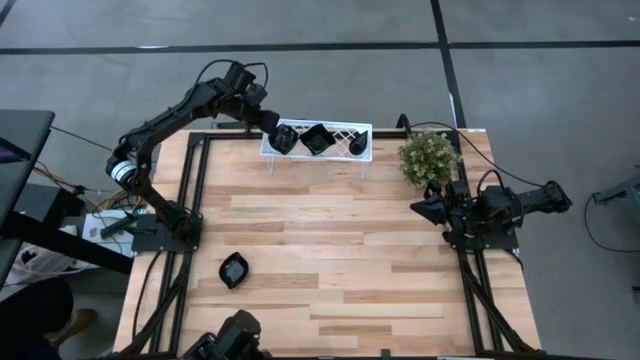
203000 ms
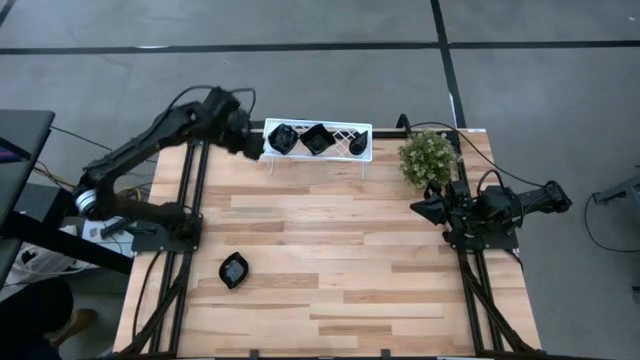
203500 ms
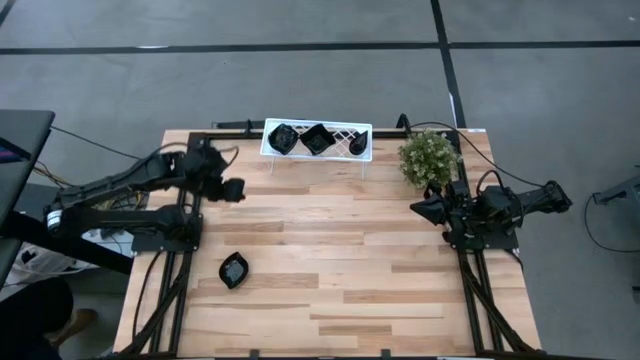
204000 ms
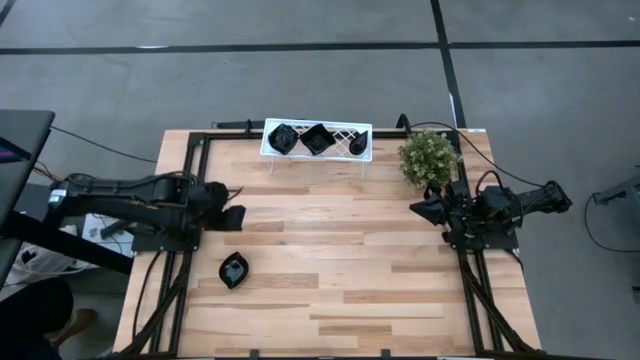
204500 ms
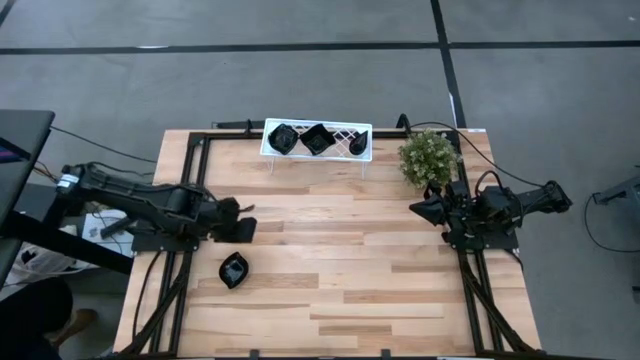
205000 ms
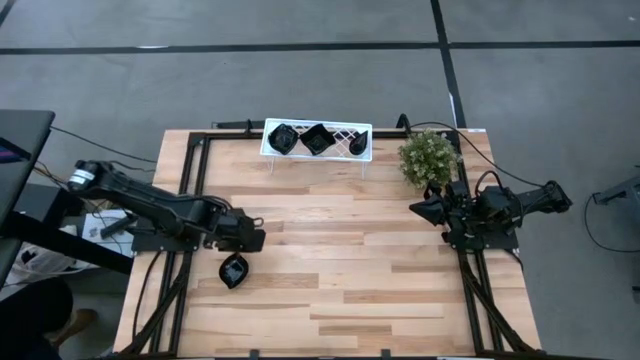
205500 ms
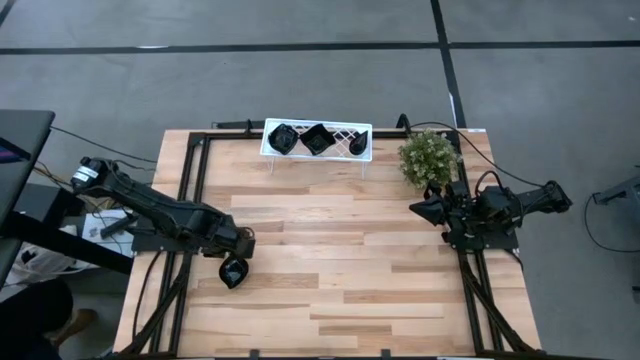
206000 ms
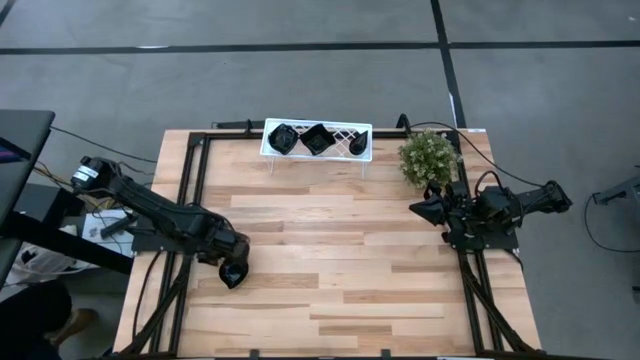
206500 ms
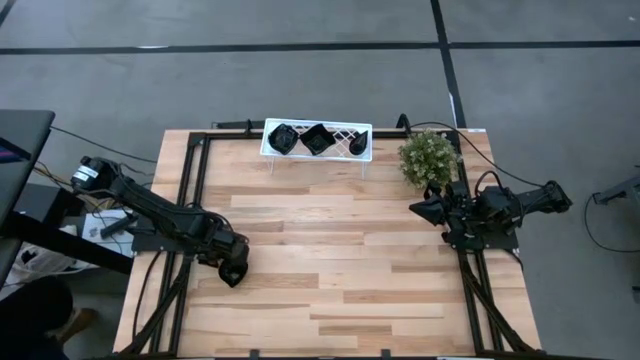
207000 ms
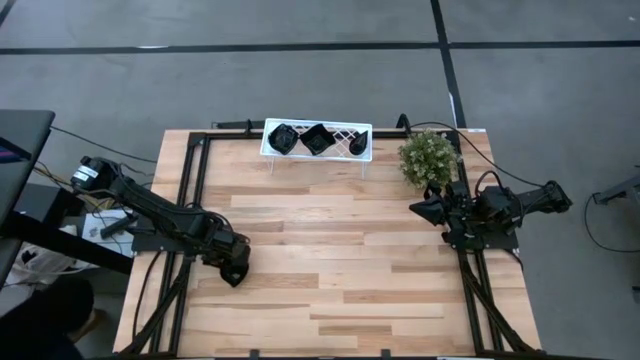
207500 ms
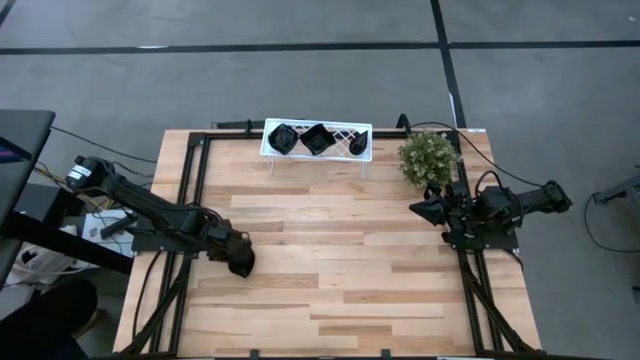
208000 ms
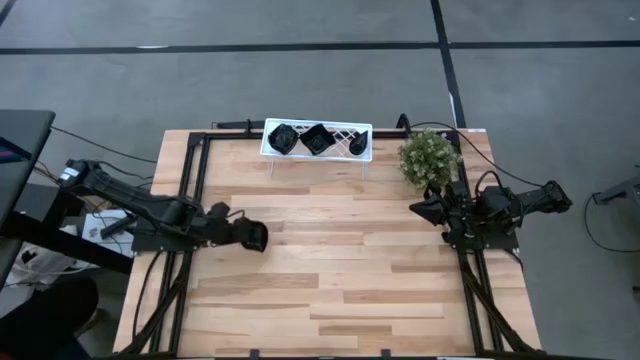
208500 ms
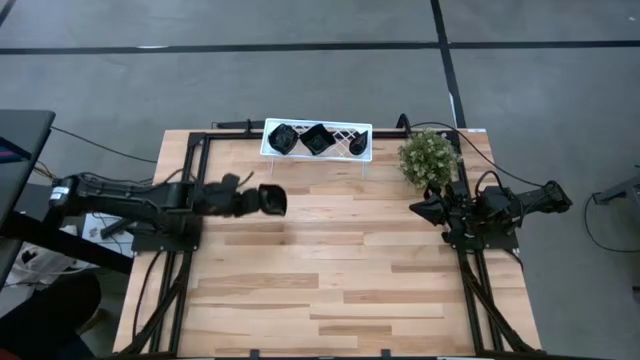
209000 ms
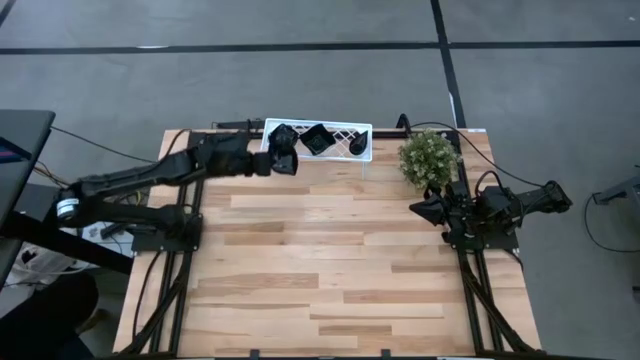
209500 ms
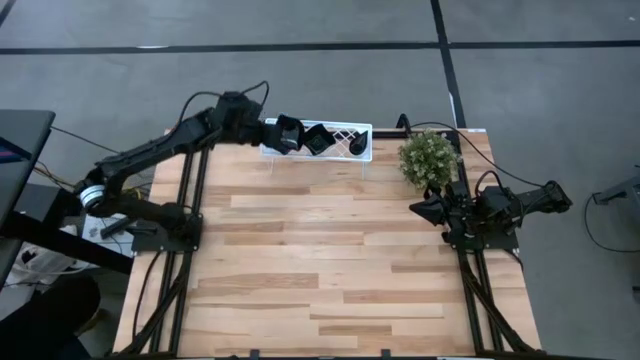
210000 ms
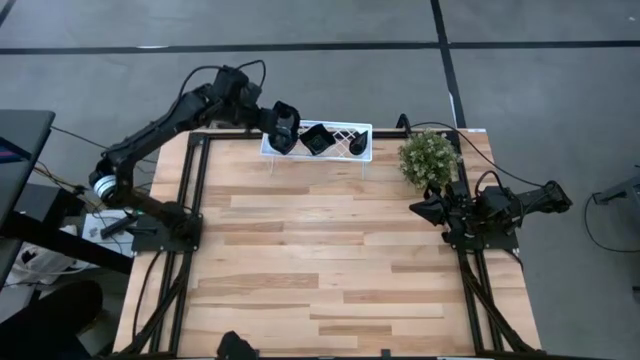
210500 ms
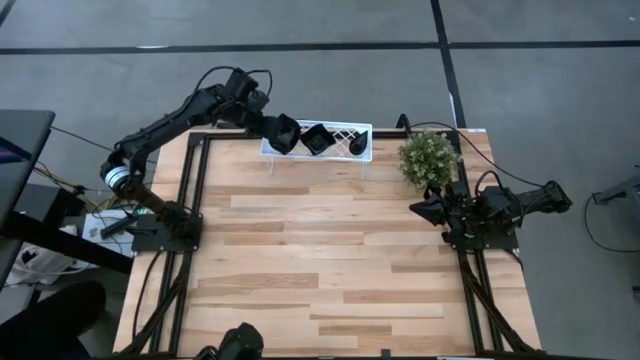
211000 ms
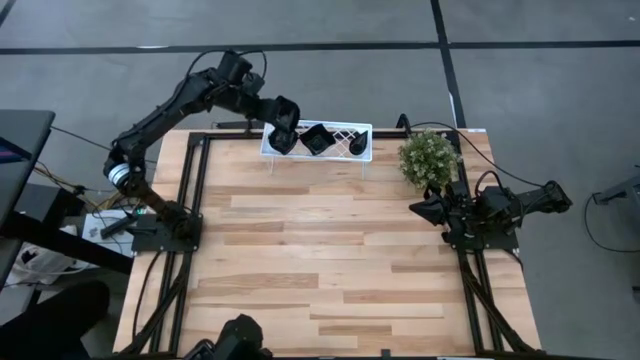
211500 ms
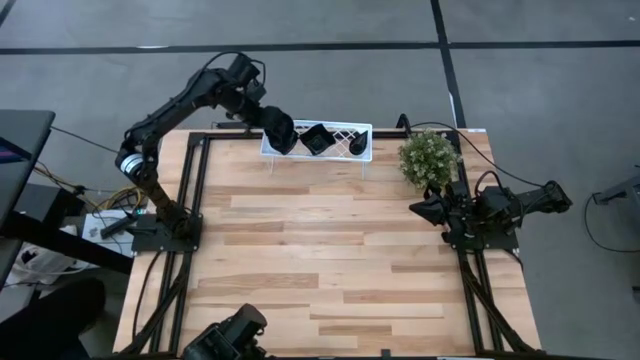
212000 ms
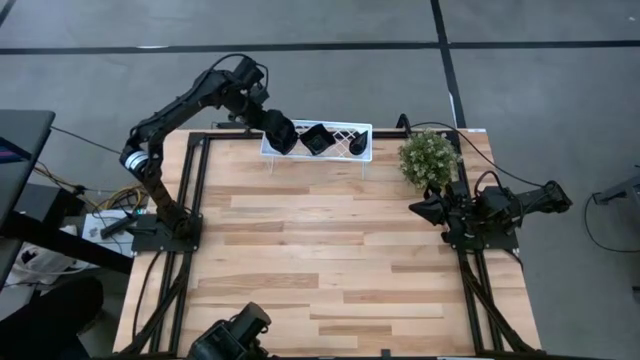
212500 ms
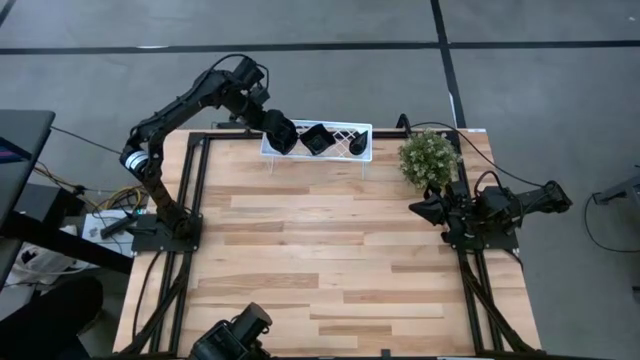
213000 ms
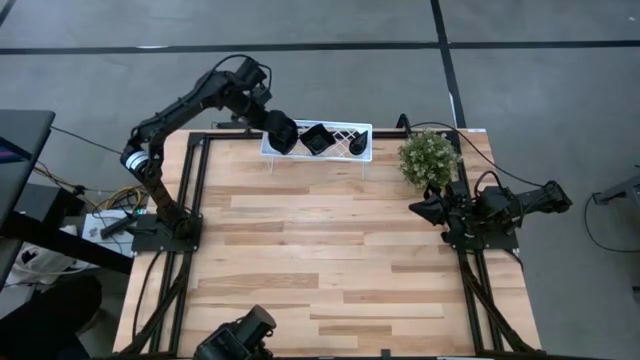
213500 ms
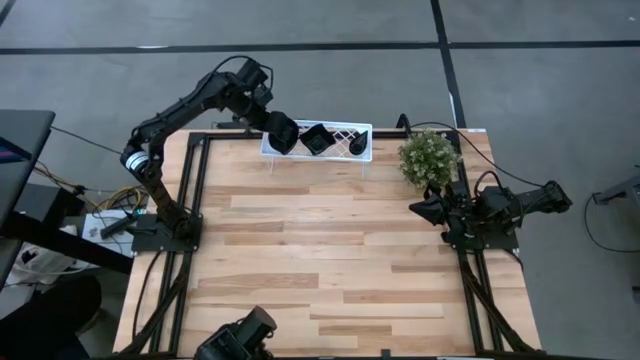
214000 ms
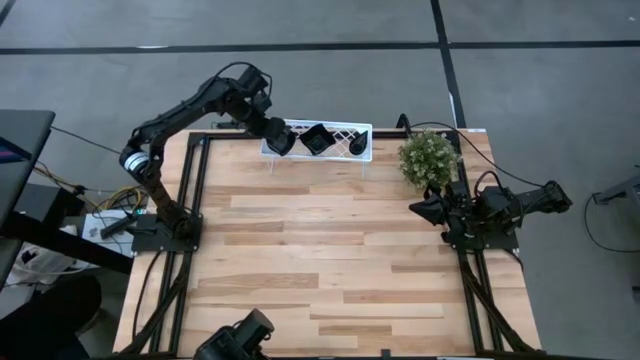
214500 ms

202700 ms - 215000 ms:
Task: Pick & Place Mini shaped plates
Stack the black leaf shaped plate on top of the black leaf shaped plate on the shelf

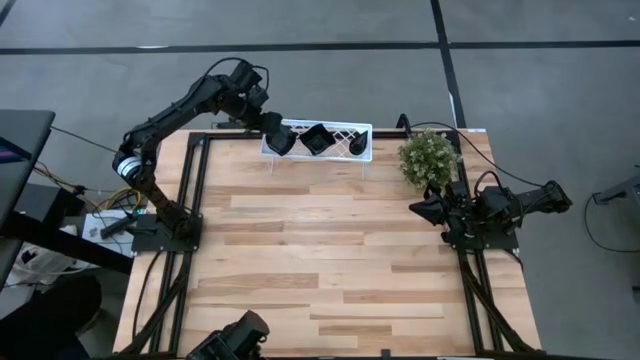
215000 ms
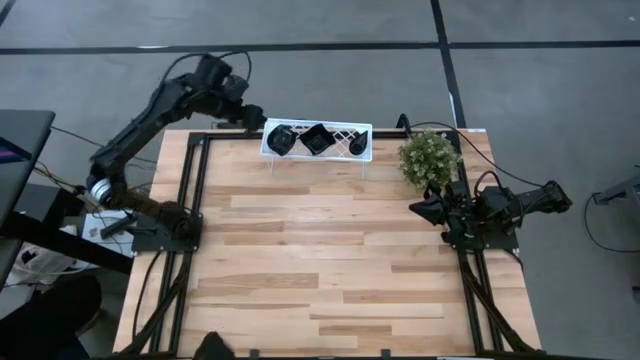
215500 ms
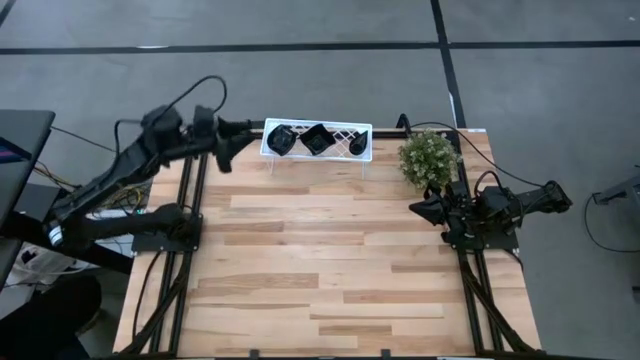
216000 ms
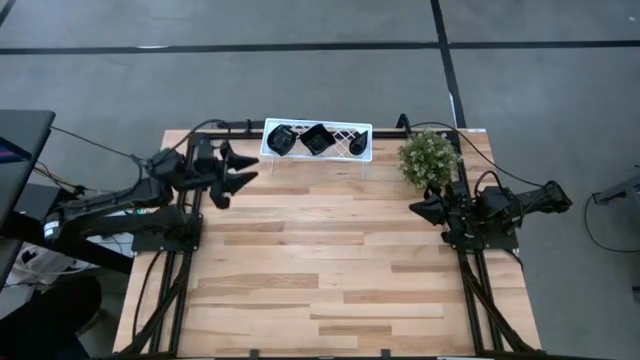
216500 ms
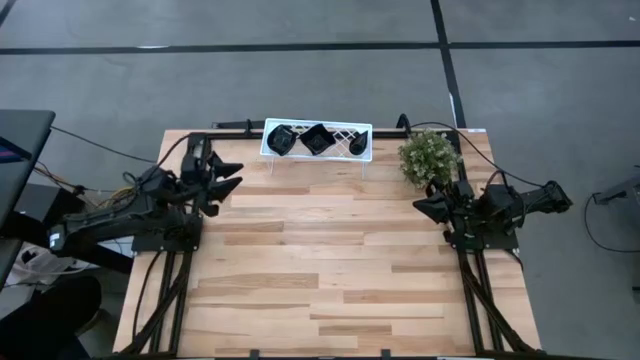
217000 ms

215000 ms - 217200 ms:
Return to Home Position

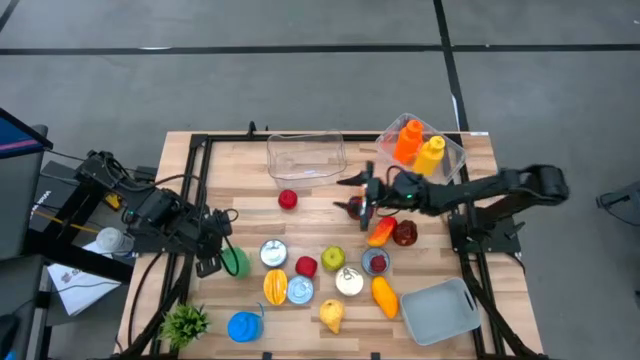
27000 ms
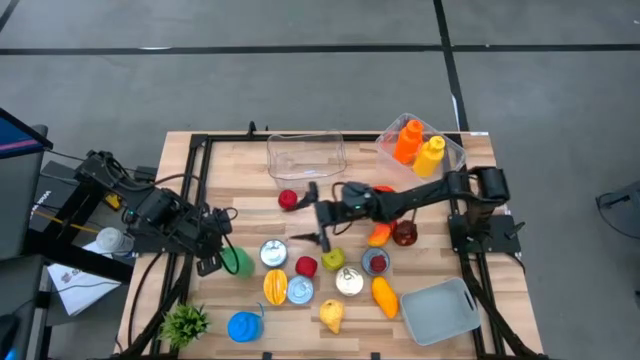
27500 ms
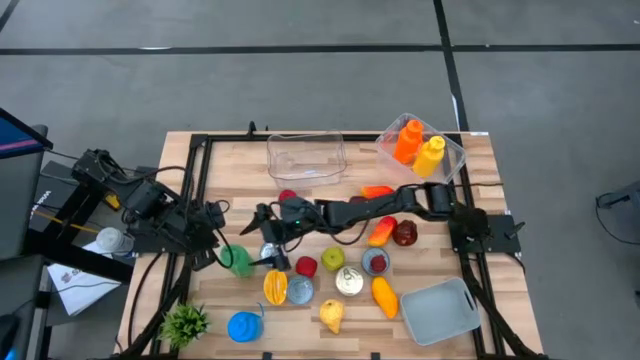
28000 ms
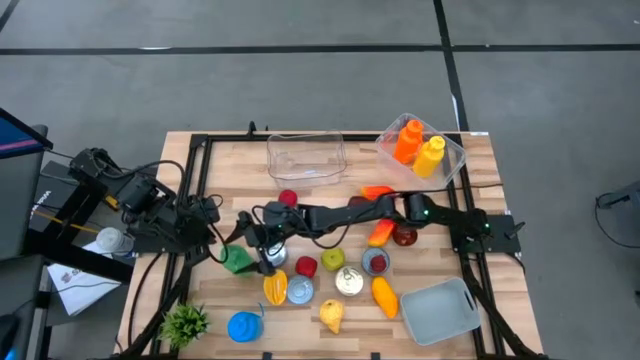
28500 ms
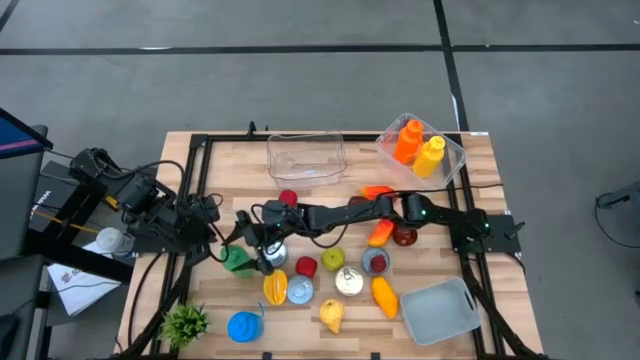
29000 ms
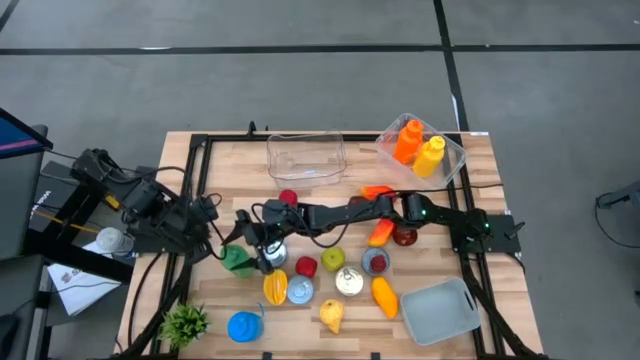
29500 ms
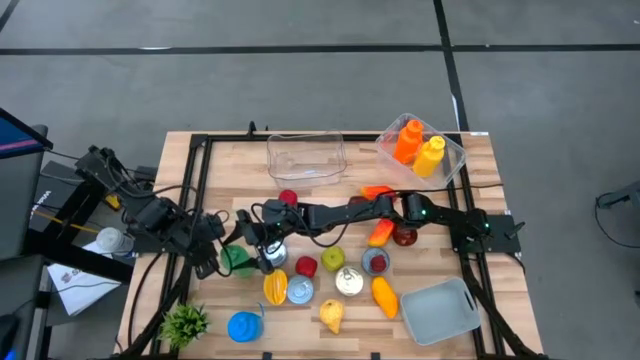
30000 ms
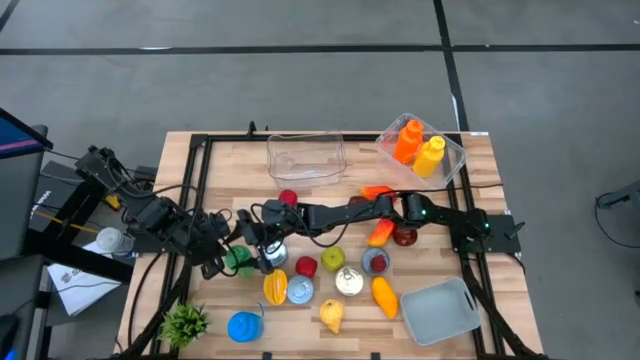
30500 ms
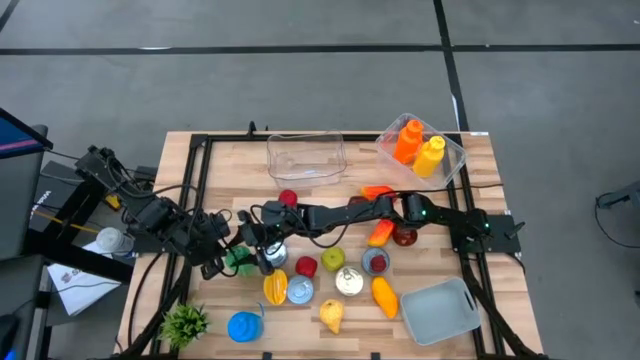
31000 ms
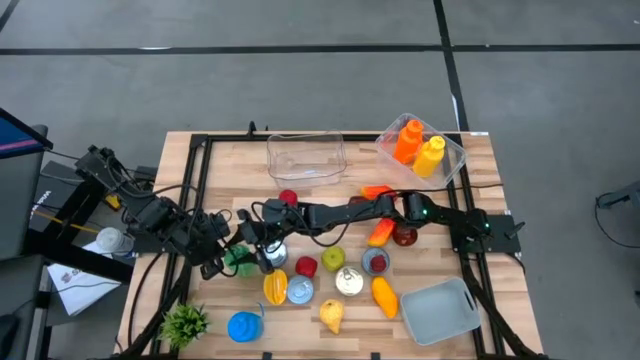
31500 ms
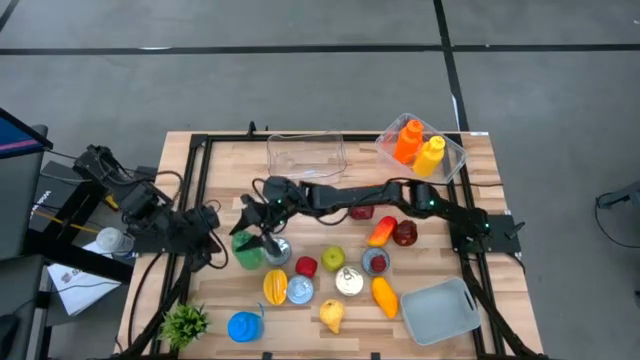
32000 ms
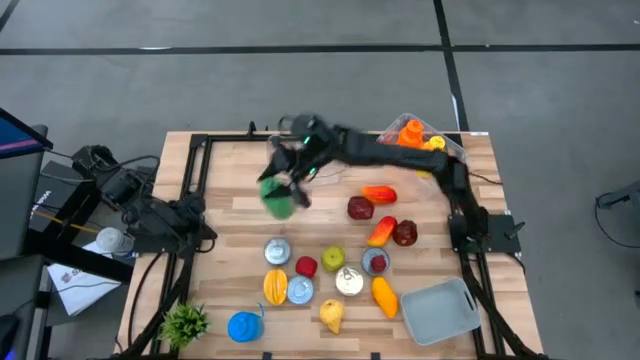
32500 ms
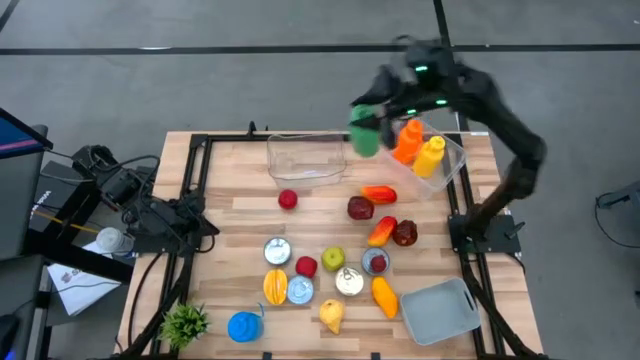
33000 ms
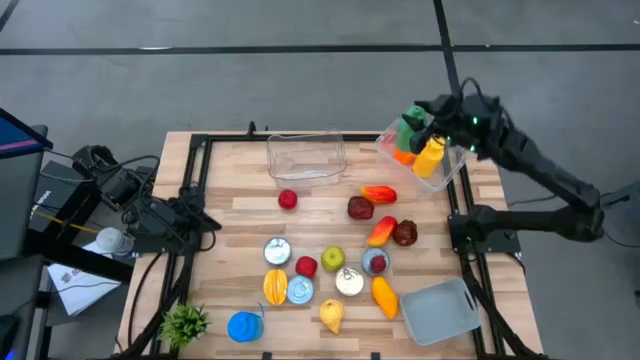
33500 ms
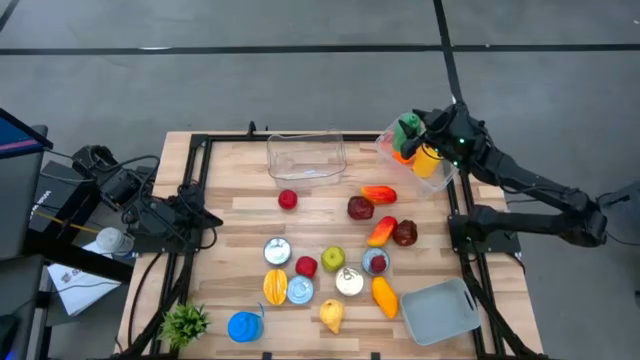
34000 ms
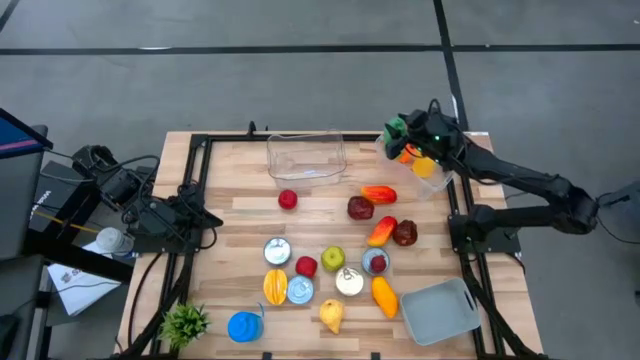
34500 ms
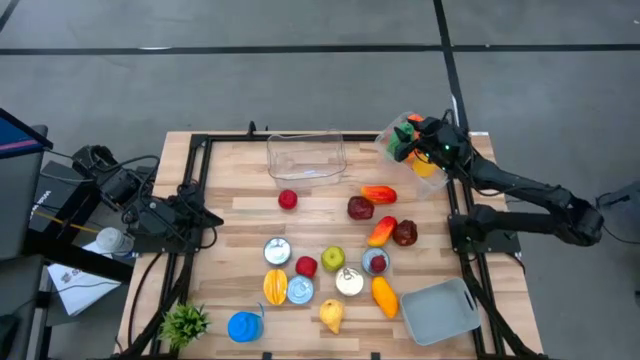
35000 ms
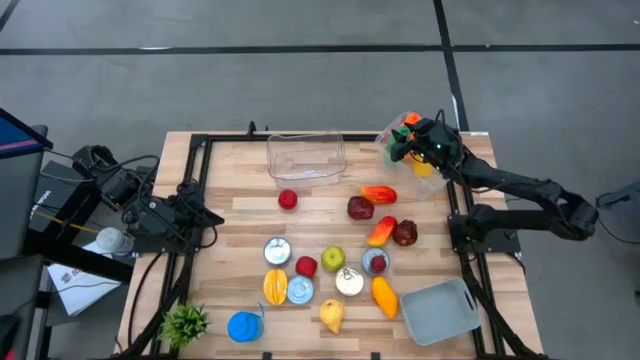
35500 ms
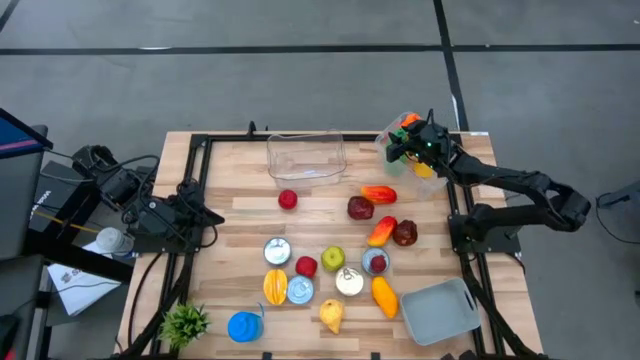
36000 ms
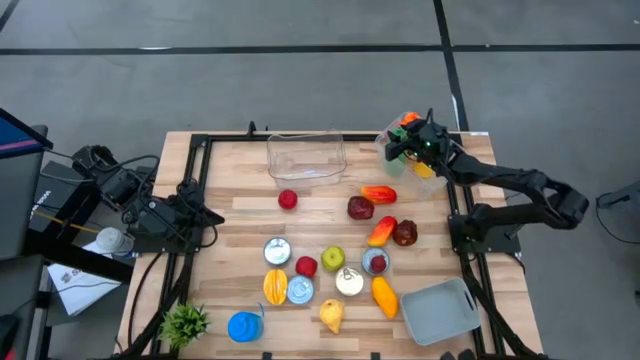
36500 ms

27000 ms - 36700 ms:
Task: Pick & Place Food Item
Put the green water bottle into the transparent container
